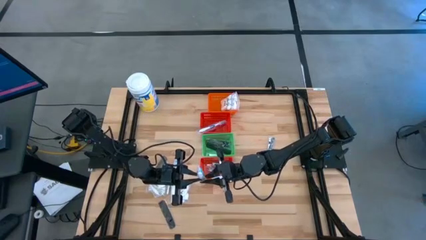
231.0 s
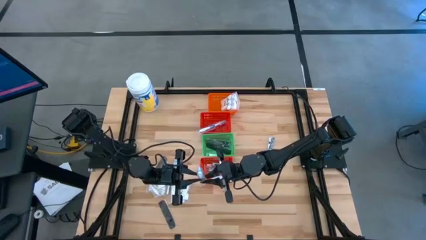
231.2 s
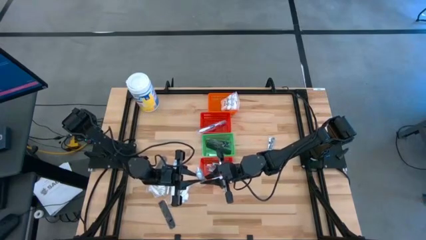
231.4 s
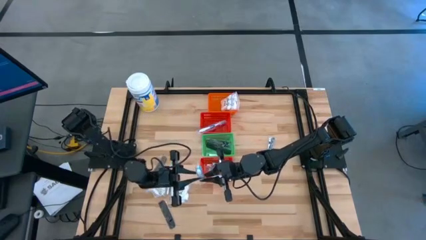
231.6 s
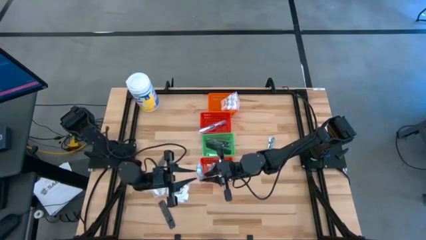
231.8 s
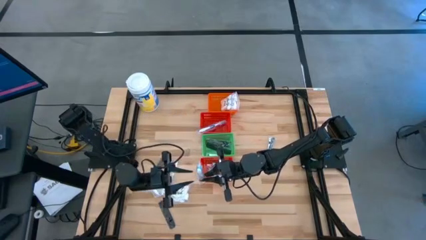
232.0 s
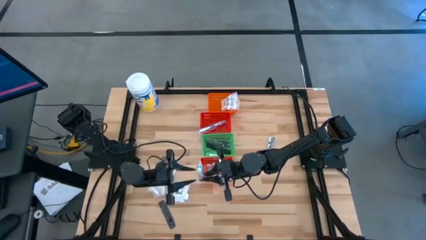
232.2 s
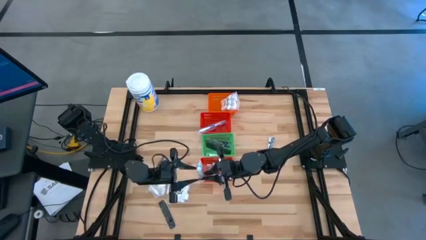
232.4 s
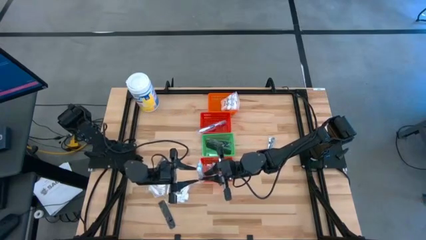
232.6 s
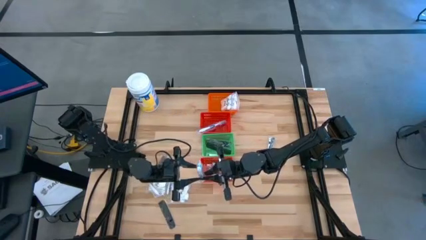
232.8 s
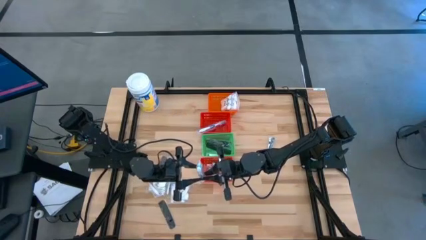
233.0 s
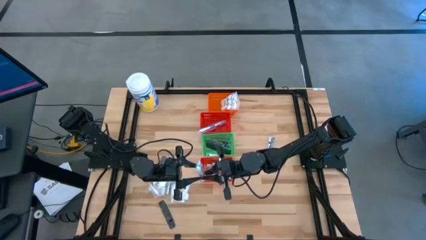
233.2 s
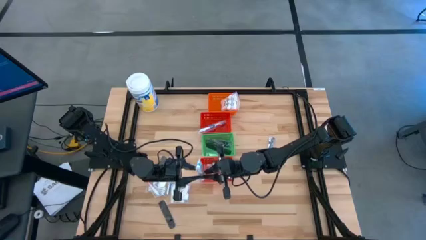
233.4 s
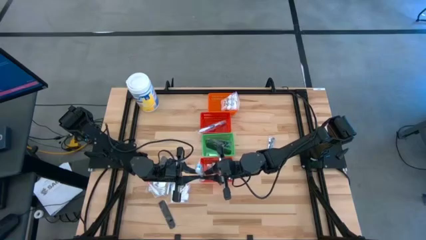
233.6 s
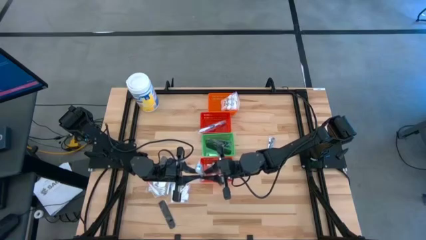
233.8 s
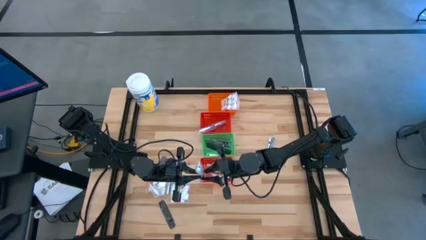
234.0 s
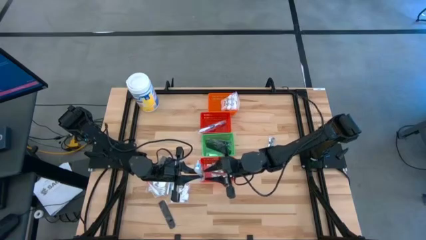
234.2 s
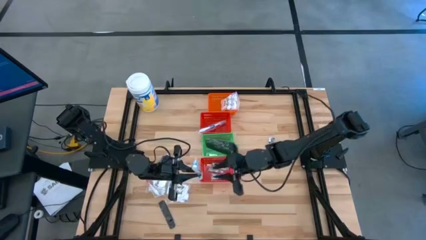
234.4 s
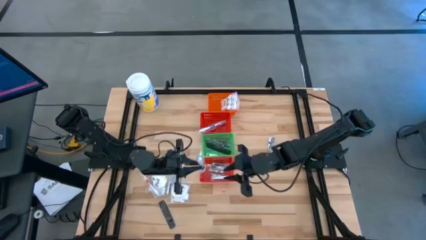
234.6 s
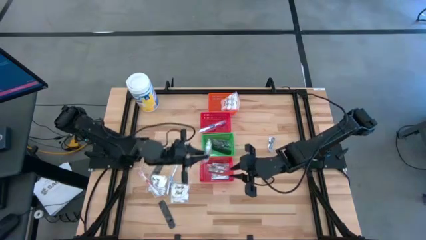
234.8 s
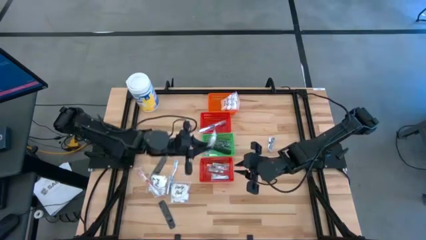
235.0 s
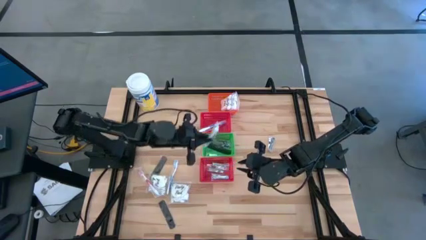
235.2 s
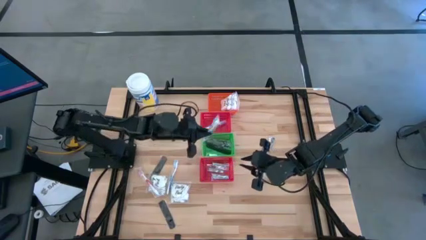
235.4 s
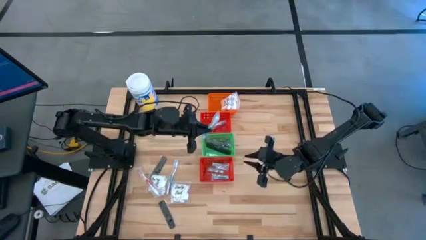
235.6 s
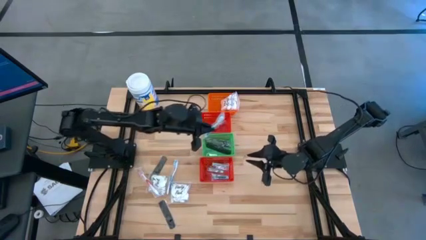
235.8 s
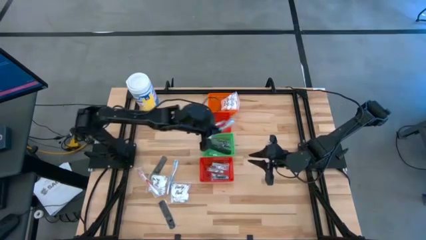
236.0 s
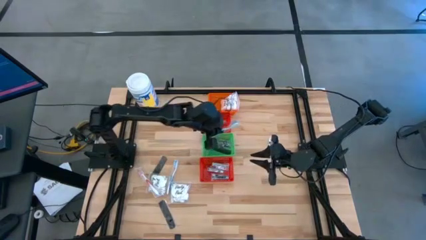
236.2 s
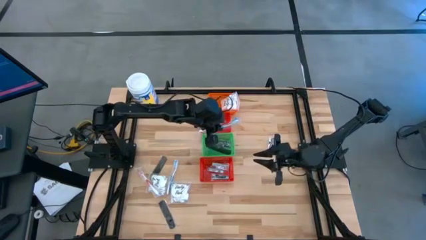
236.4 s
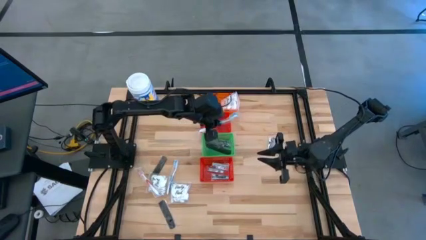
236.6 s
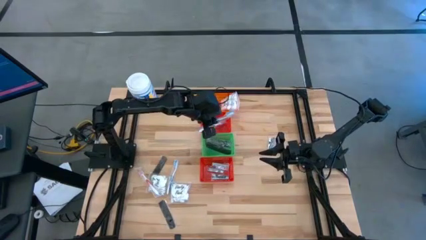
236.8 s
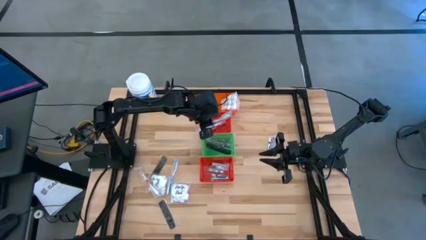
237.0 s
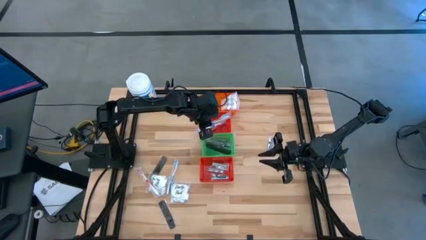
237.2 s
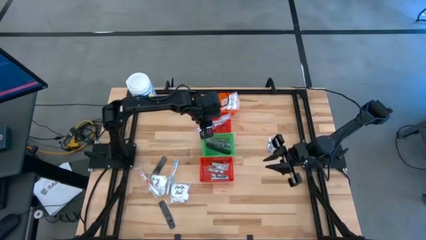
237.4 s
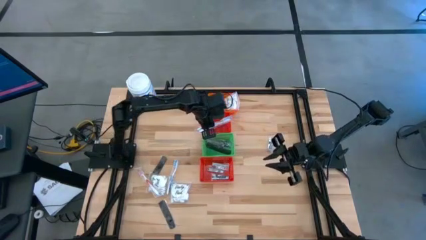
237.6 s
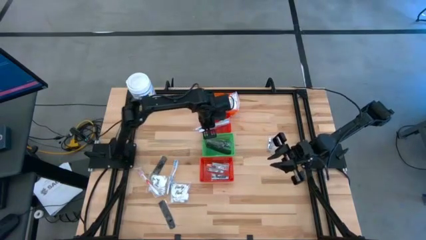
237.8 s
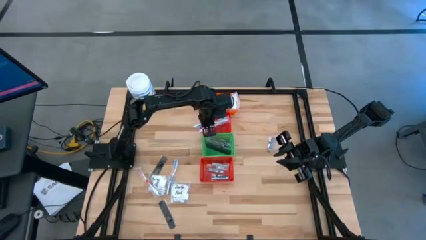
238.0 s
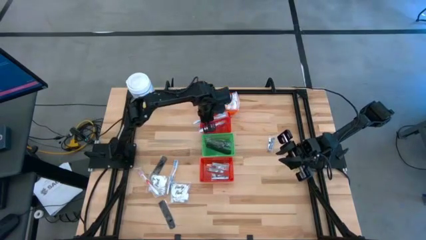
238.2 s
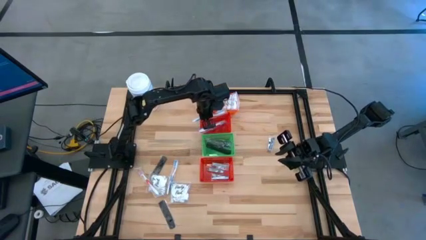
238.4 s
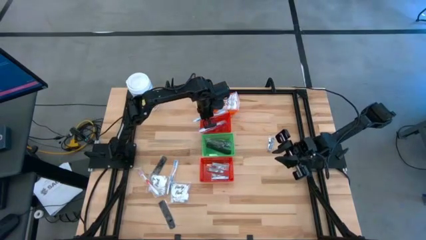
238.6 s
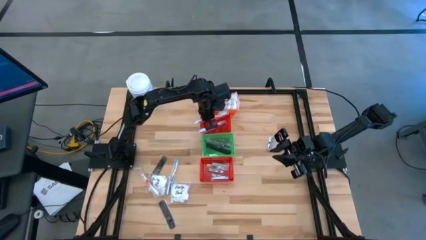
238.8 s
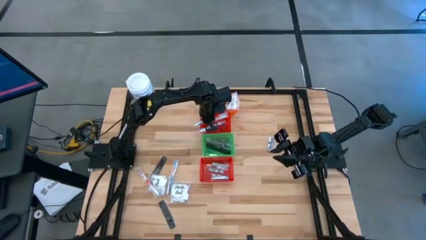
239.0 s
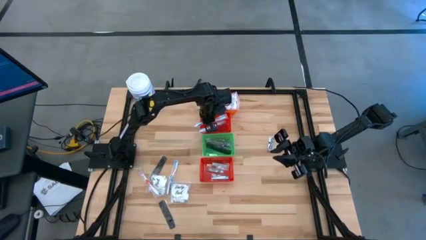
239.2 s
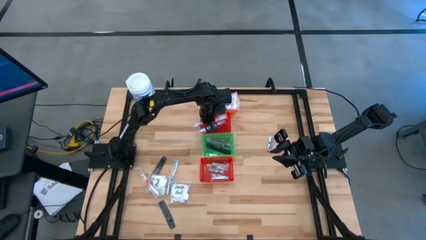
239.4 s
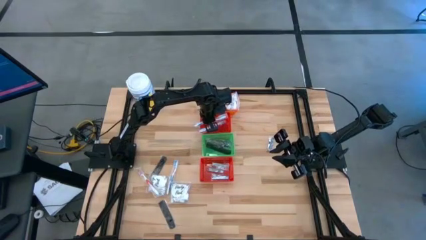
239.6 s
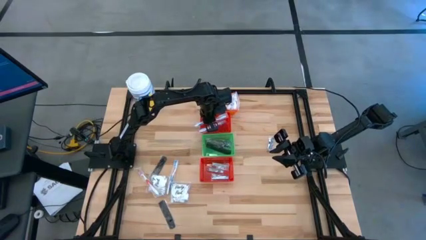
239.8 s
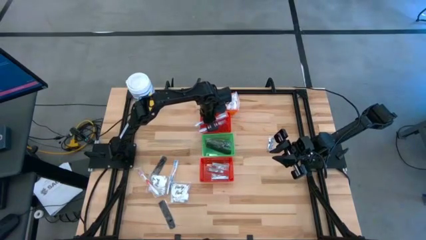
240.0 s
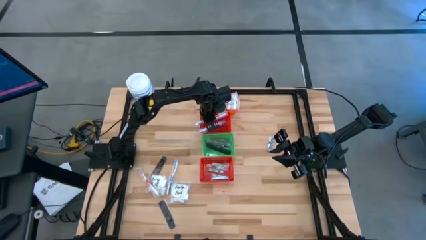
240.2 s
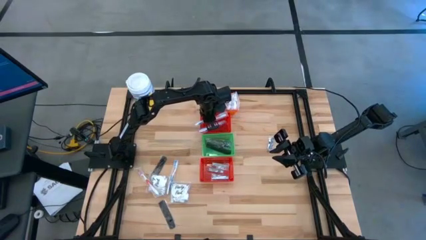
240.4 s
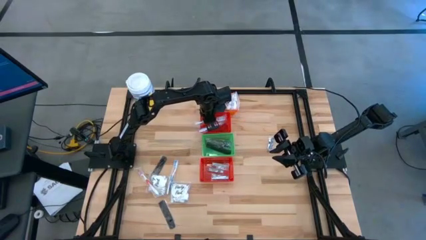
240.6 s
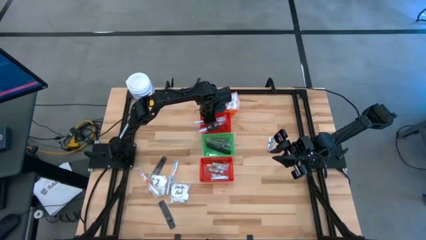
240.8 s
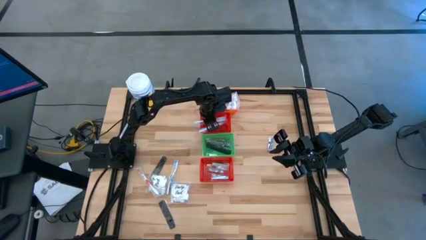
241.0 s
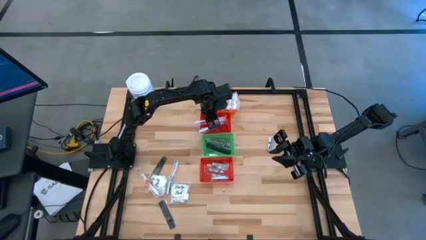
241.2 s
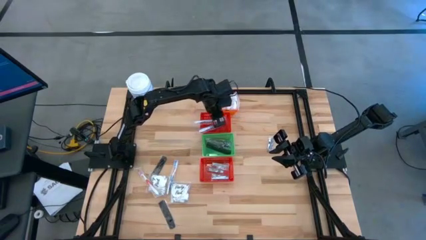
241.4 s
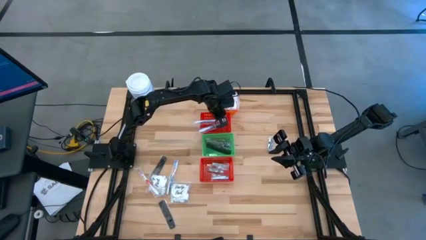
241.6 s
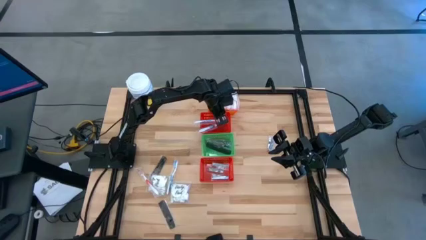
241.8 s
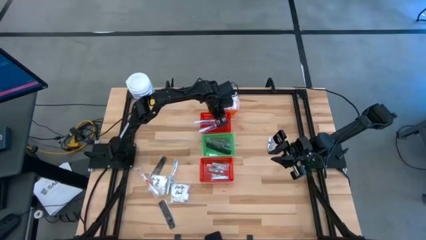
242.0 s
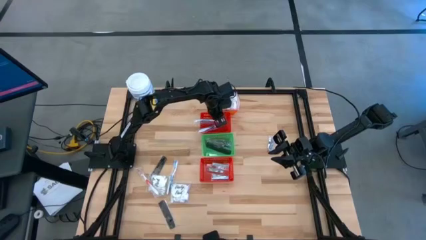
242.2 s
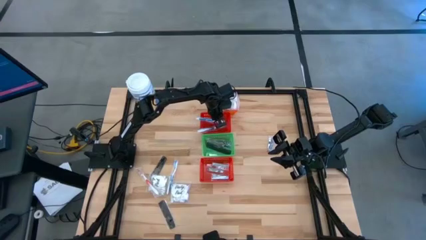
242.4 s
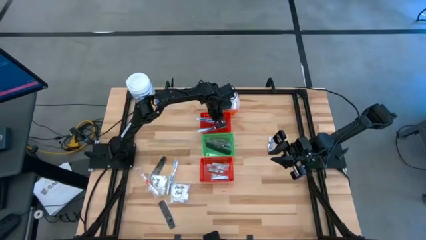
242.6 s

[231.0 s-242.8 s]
Task: Pick & Place Travel size toiletries
Put the blue toothbrush into the top red basket

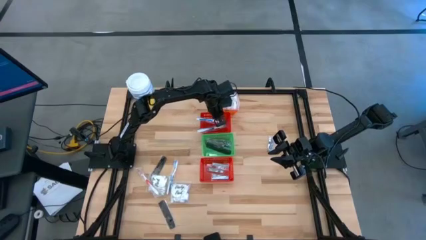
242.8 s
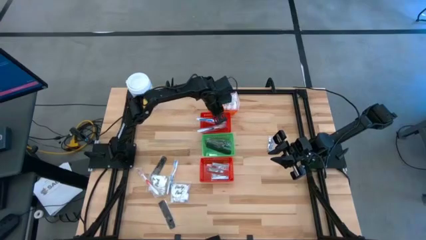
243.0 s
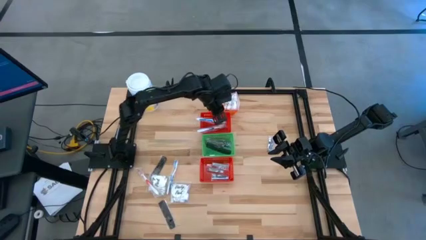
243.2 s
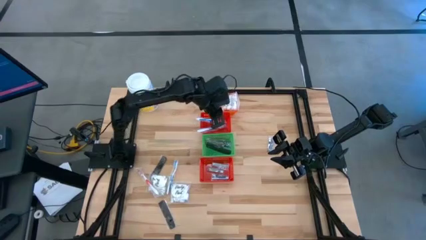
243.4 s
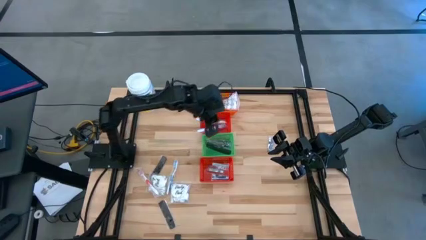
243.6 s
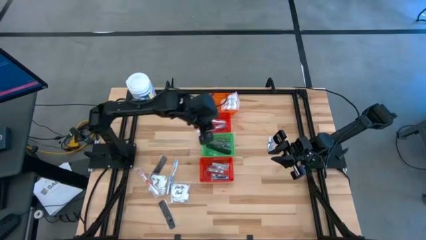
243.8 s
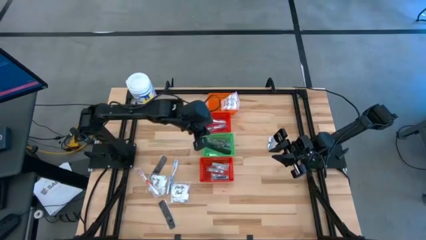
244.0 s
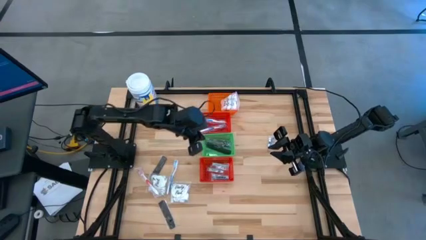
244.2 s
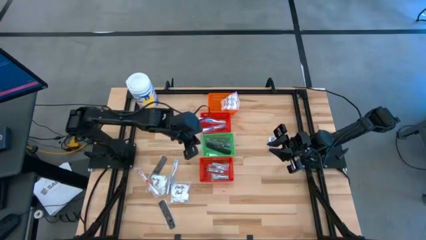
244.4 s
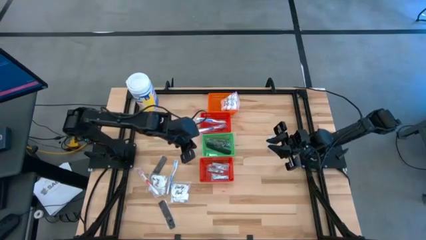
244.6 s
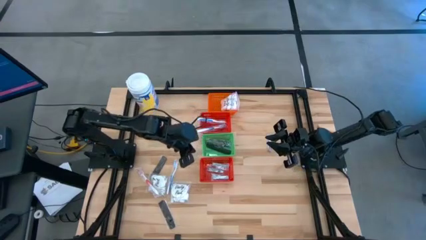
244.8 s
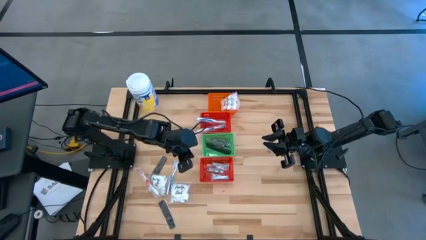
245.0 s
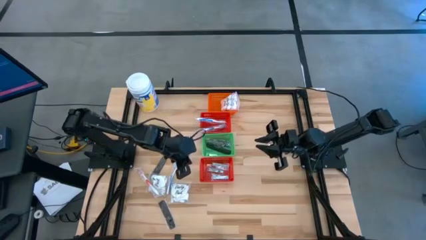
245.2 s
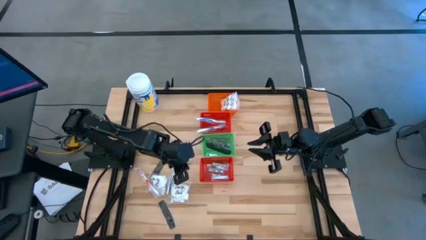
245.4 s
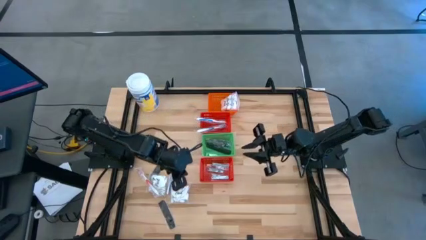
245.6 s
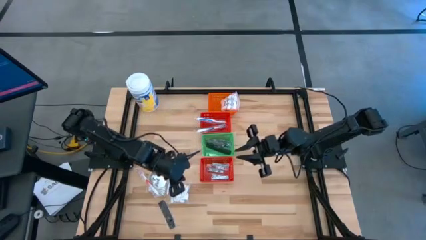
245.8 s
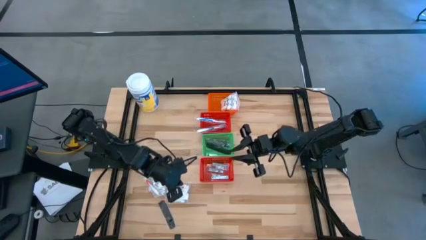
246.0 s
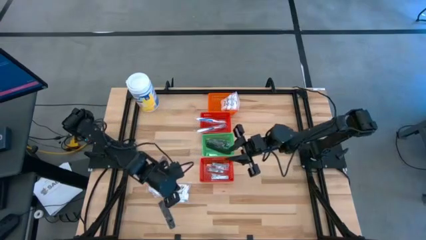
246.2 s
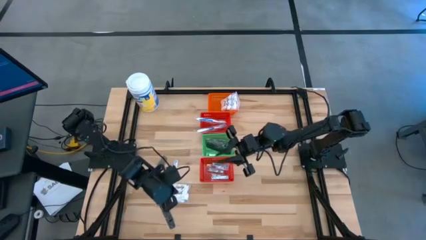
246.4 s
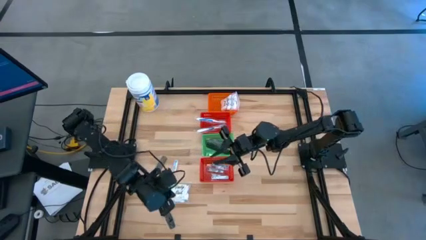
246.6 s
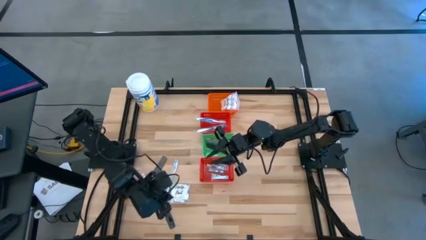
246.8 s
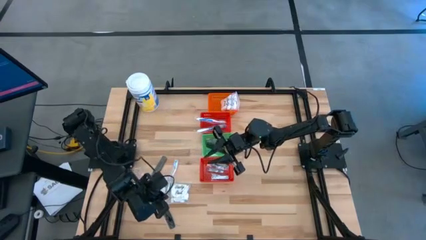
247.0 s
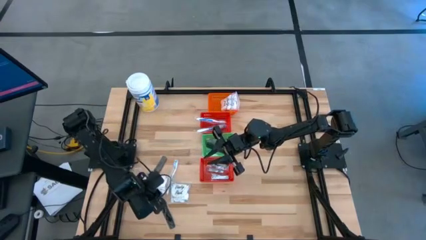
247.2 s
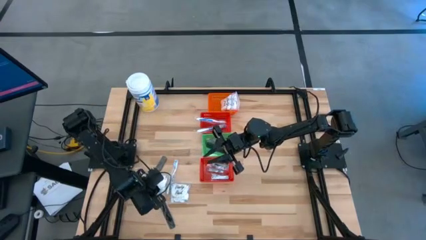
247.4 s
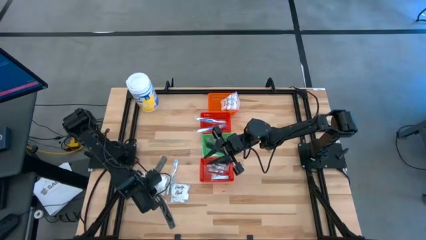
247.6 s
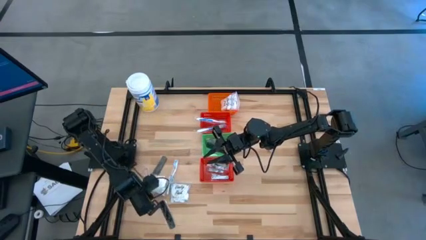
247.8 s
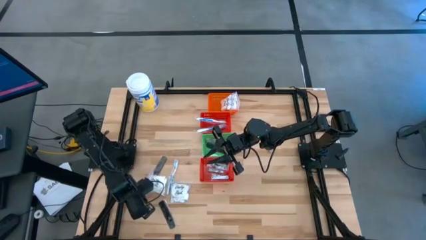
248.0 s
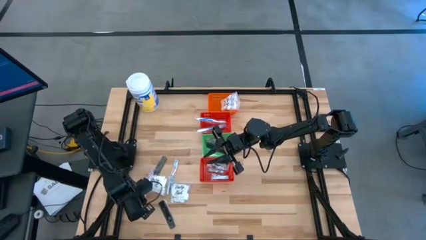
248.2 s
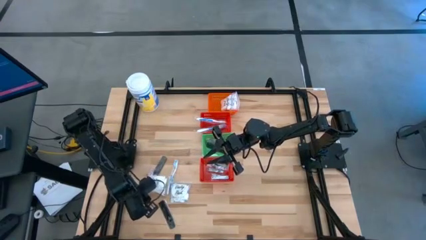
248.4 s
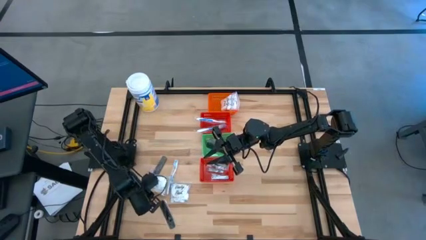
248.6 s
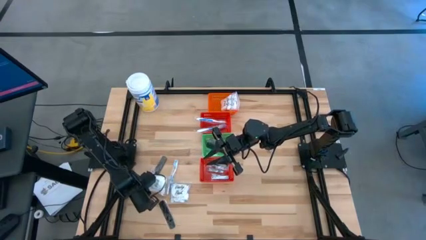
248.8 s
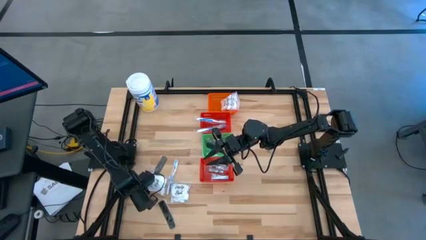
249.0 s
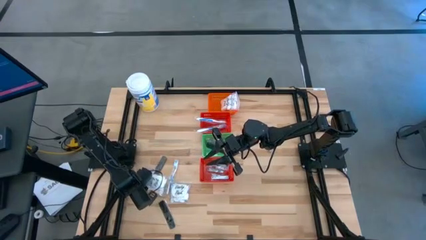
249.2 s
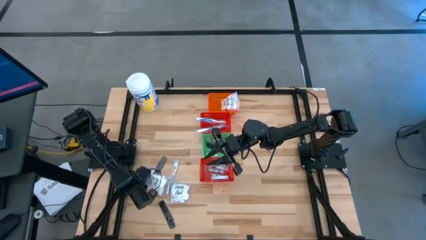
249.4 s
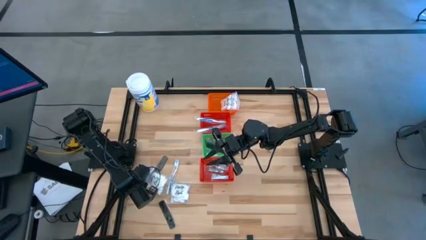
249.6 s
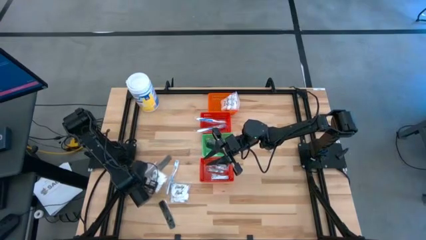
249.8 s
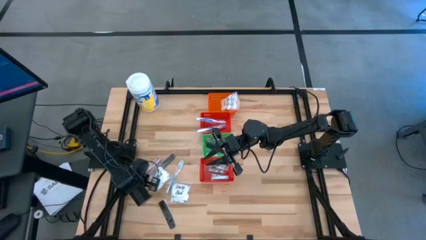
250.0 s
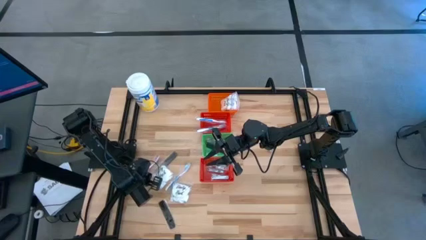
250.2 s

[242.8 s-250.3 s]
Adjust the orange toothbrush
